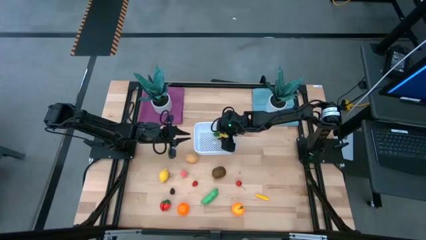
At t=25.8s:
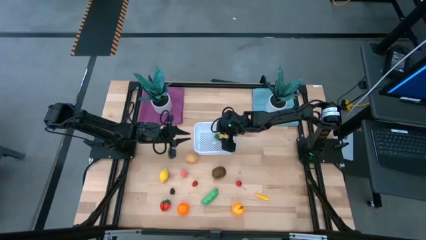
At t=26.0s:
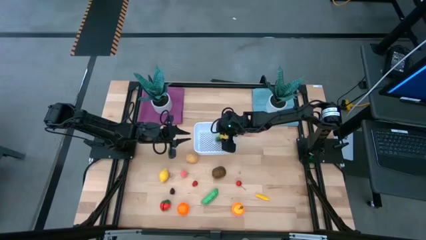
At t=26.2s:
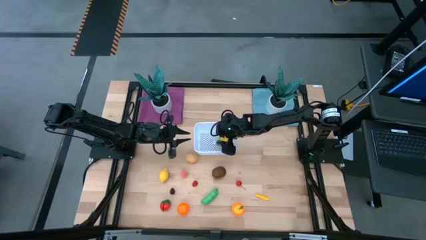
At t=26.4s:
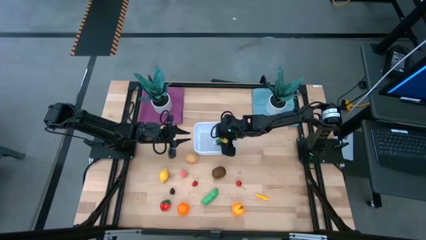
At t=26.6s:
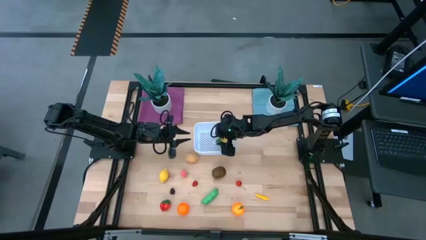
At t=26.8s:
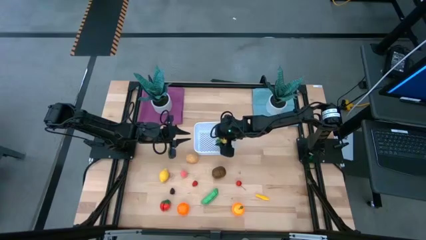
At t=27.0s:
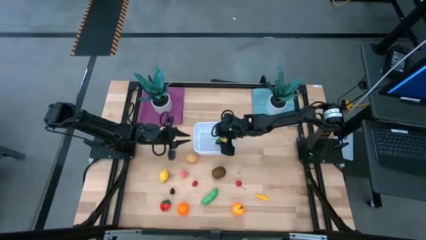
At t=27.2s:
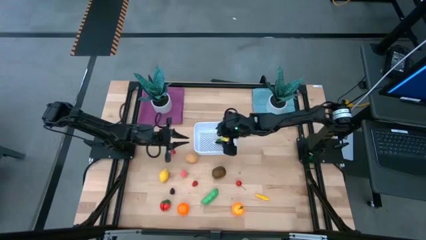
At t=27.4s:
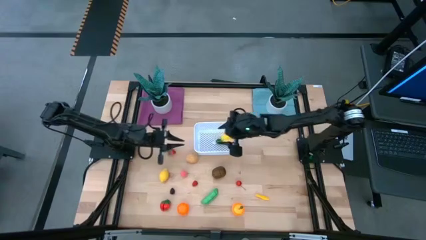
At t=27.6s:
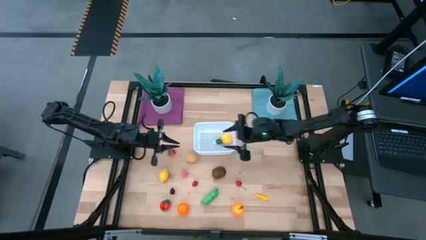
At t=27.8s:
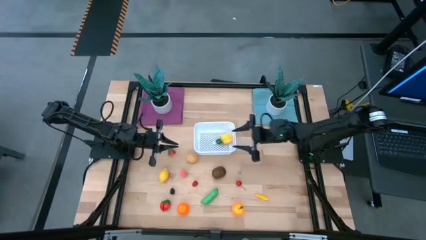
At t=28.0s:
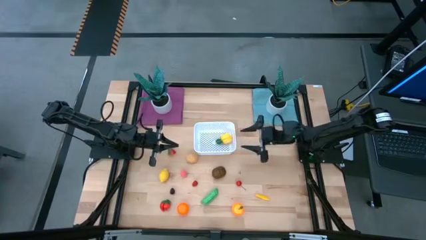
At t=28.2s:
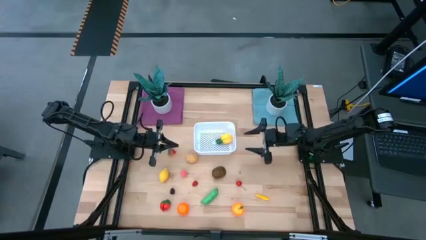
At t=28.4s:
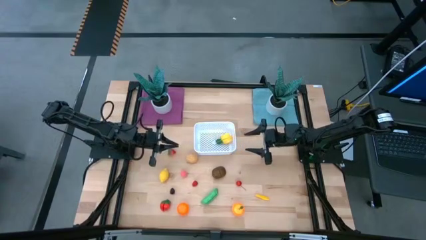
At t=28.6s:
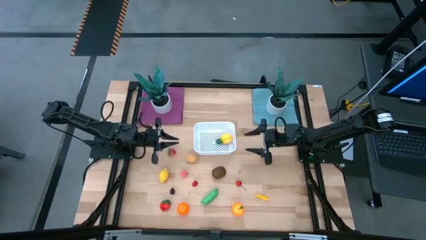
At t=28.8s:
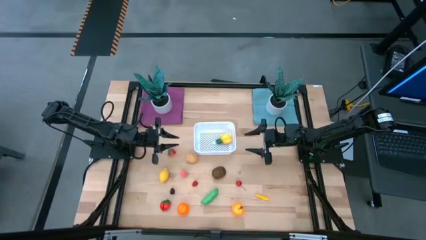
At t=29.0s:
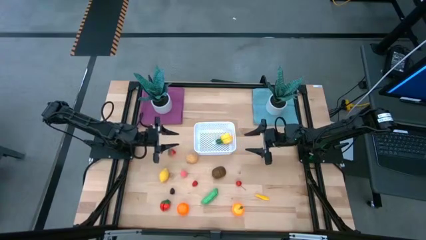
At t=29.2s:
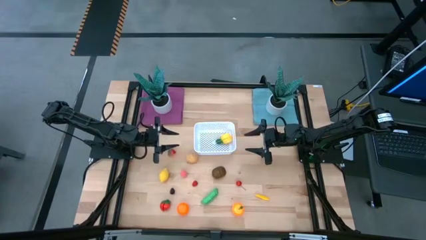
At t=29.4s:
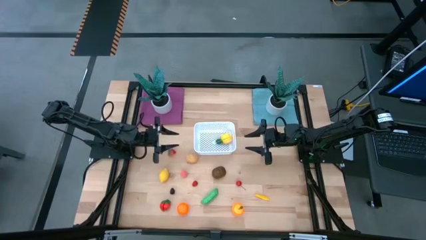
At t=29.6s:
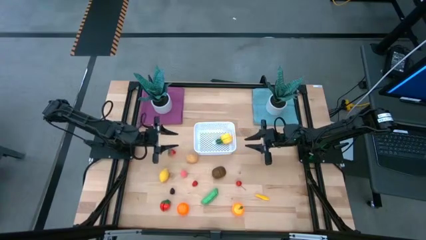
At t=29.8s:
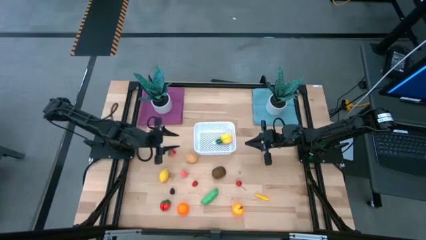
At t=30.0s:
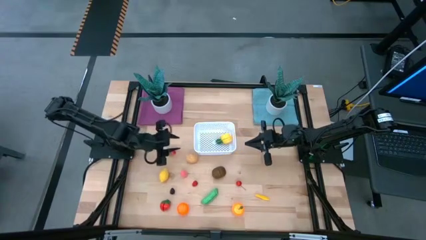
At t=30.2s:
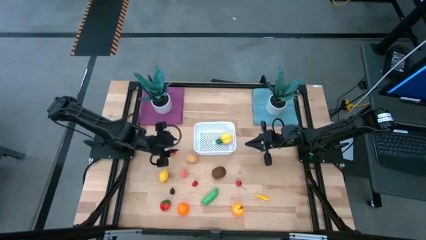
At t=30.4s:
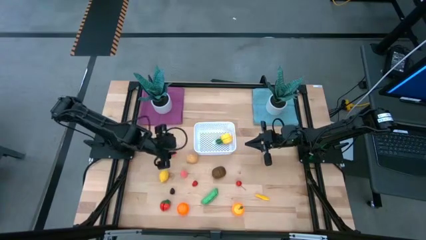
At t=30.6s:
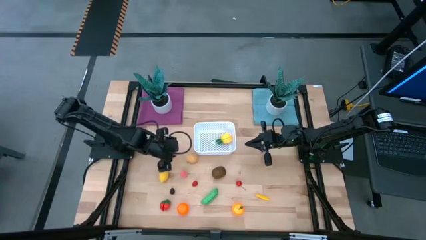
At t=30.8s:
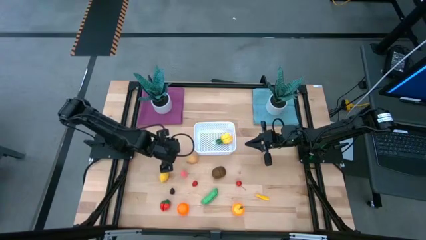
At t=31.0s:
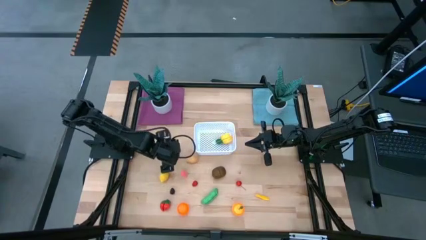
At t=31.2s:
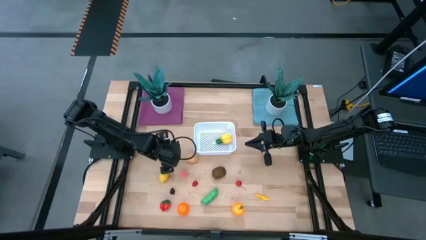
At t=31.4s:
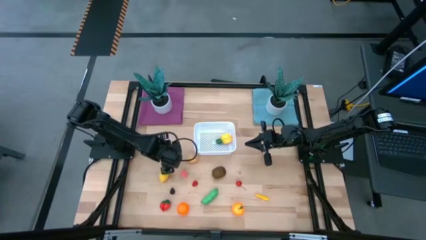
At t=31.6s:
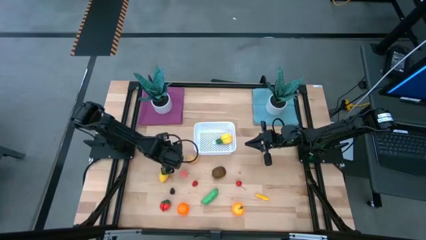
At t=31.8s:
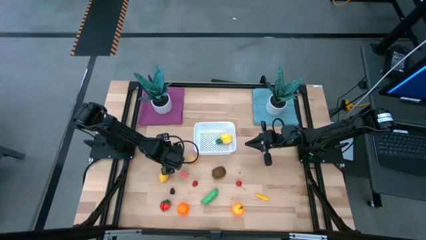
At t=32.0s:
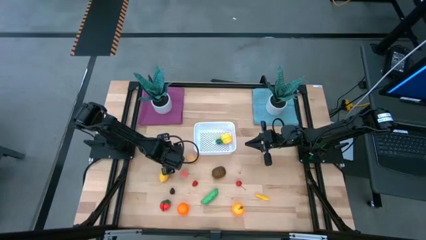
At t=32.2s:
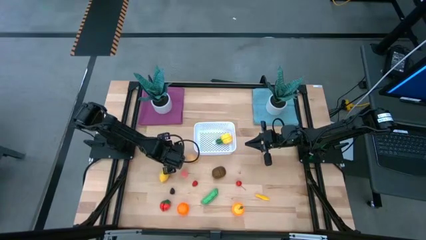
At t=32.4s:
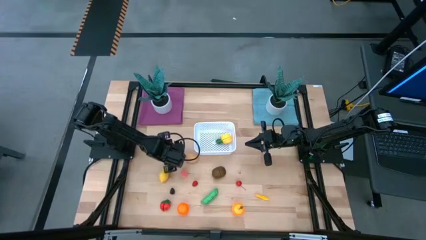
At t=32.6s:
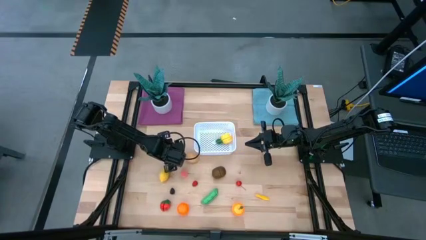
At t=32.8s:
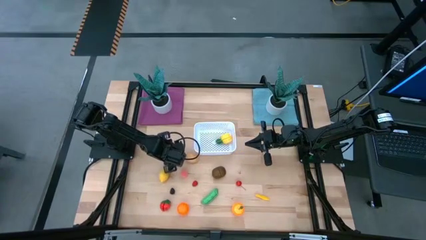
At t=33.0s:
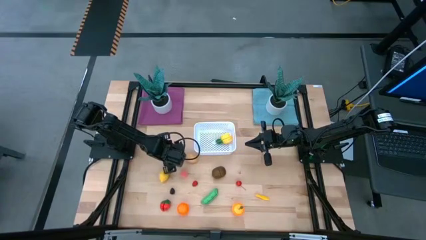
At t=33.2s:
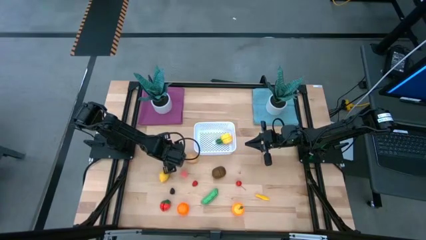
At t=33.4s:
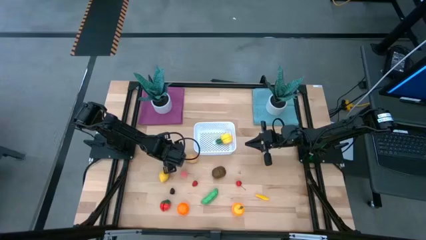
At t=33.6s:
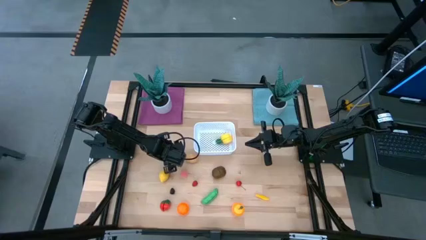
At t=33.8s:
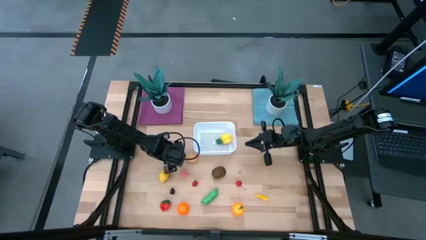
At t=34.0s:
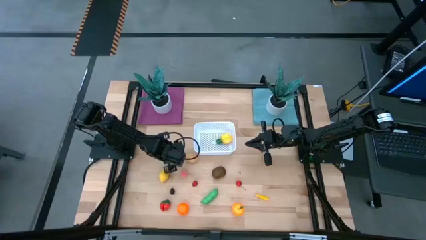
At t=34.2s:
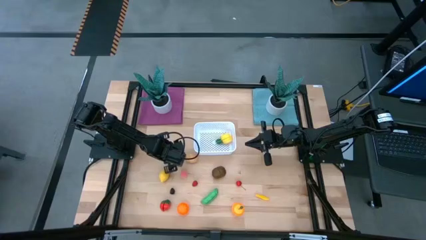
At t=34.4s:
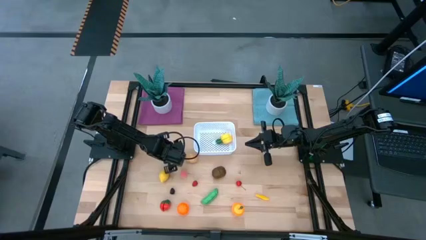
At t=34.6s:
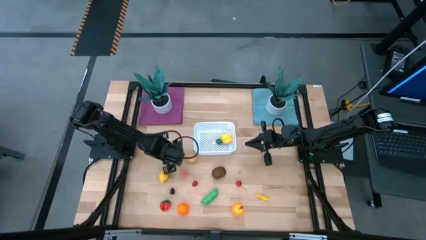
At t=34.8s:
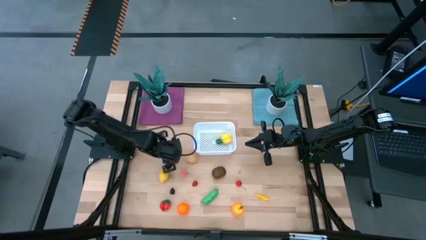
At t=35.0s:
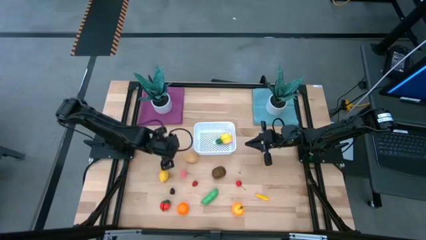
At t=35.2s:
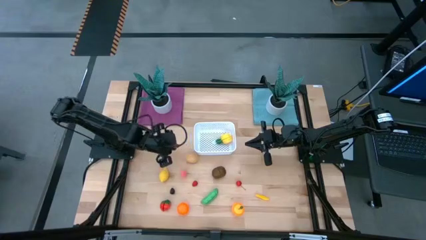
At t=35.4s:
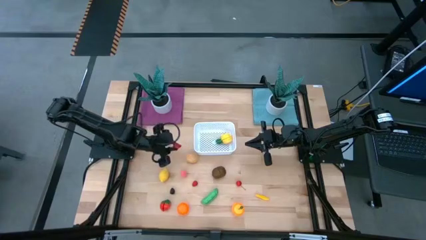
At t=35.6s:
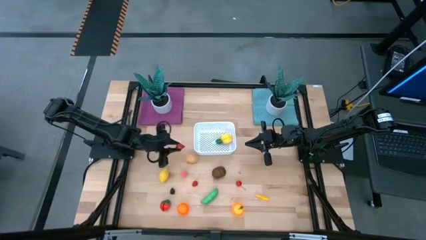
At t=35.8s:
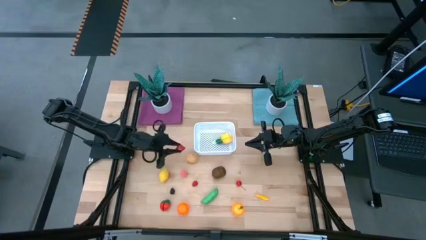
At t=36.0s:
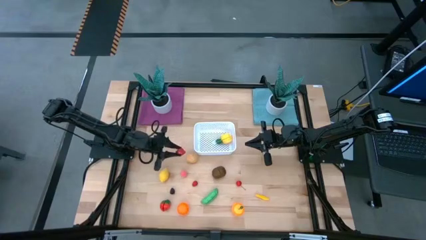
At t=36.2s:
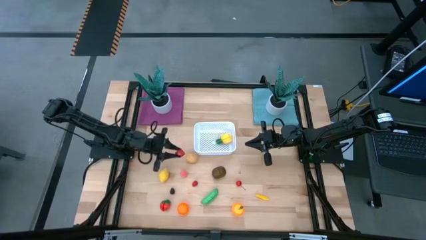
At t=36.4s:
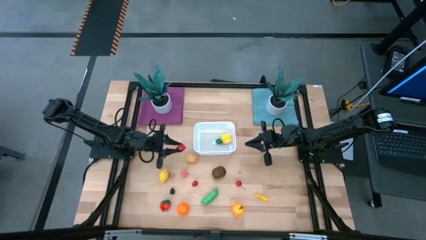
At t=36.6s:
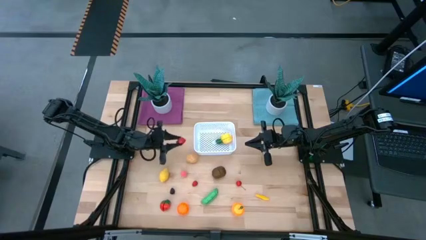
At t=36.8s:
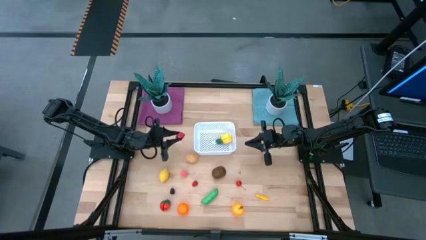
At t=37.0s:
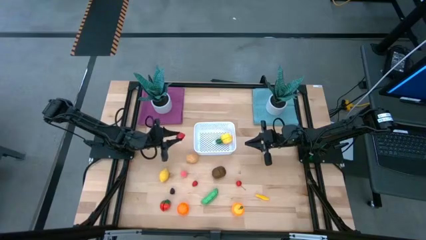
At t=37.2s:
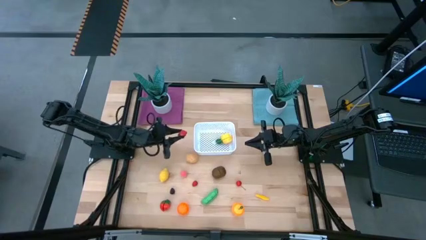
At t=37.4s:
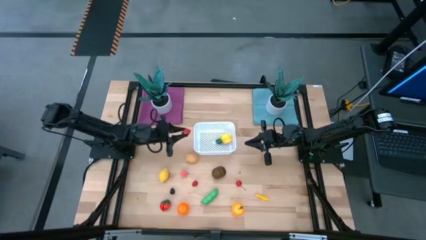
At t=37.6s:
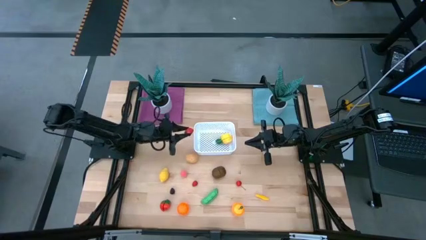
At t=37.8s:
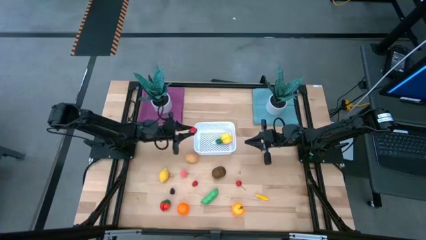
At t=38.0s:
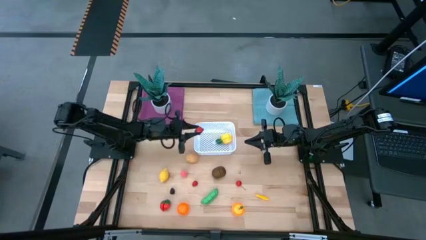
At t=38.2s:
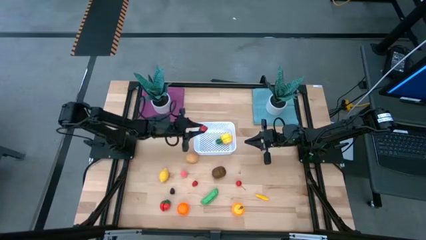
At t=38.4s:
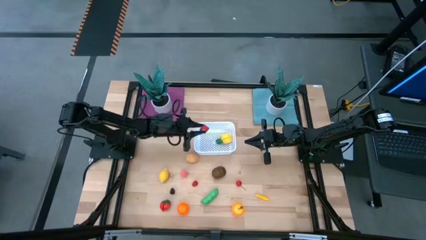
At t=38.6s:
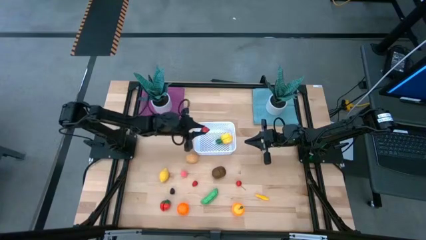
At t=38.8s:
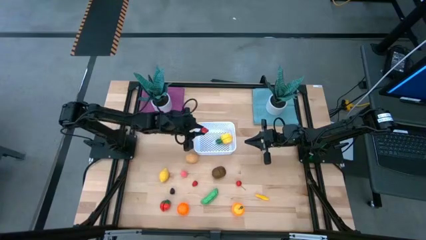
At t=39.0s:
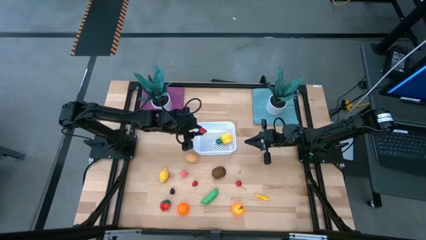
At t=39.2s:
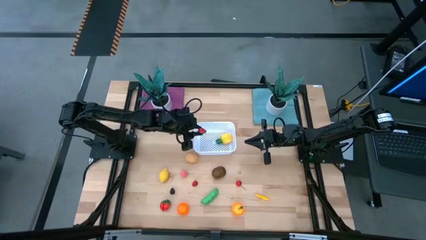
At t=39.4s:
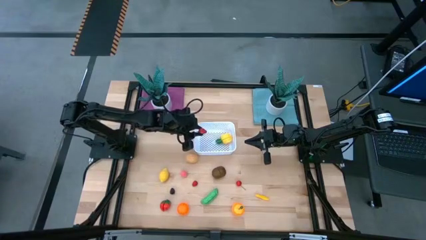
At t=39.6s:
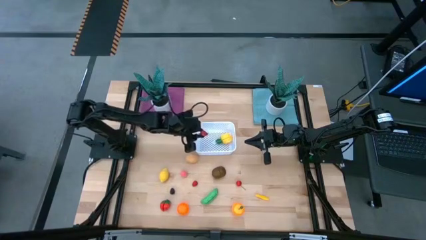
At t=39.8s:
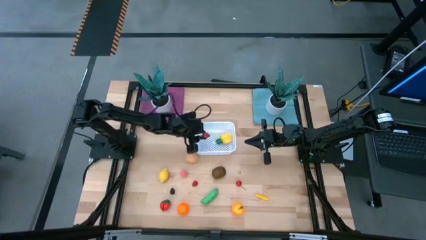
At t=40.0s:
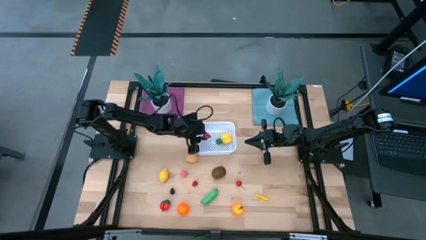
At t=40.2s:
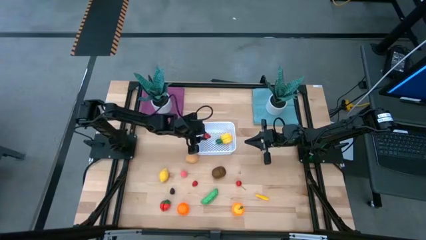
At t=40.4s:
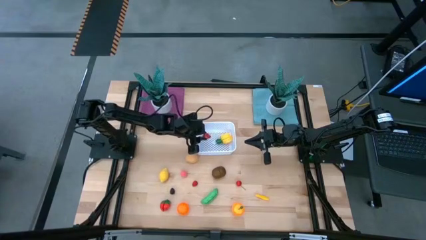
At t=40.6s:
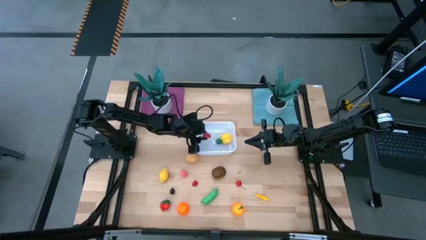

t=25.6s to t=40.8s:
Task: Pick and placing Produce into tupperware
Put the top red strawberry into the white bin
